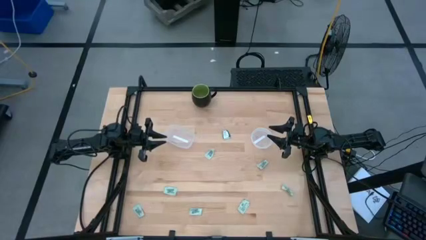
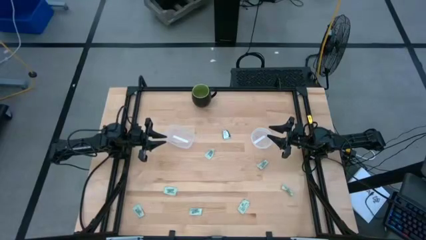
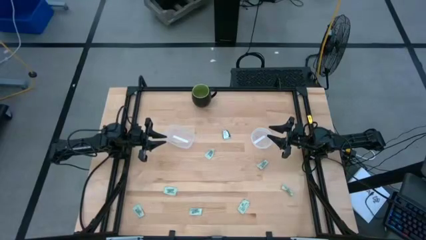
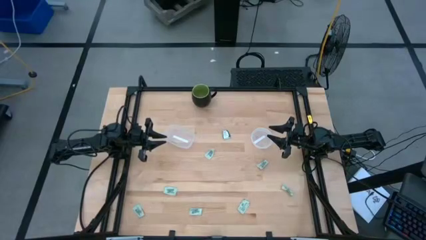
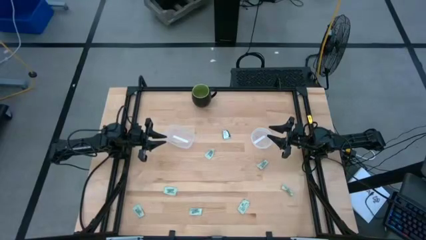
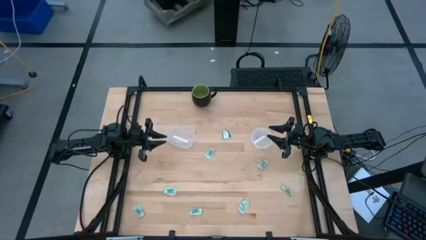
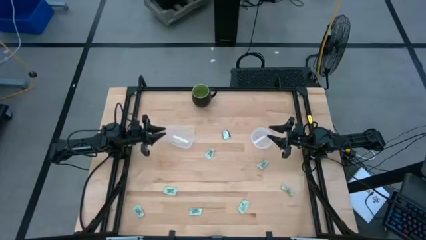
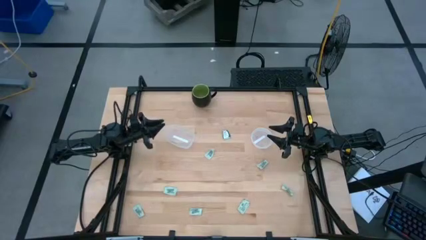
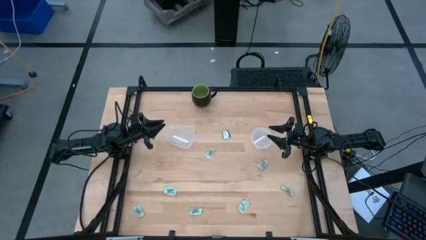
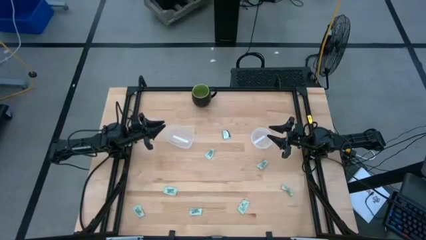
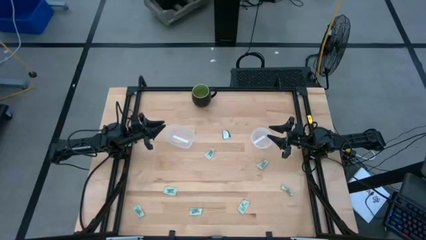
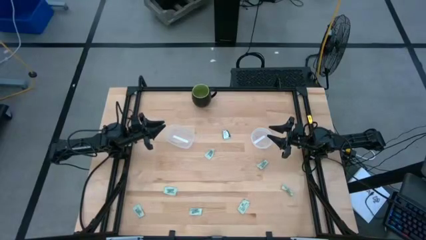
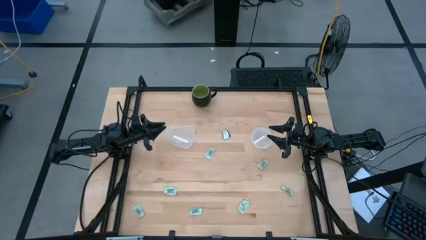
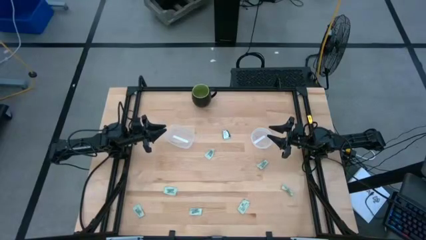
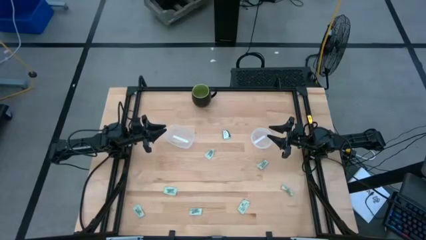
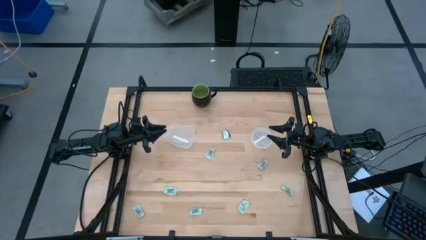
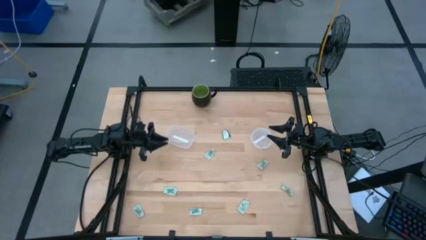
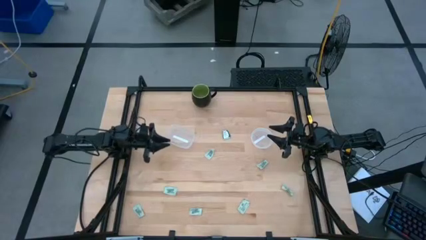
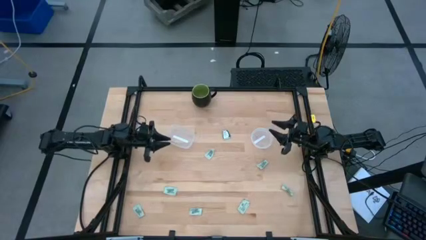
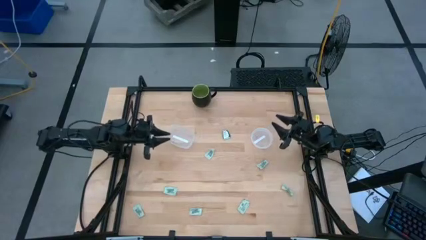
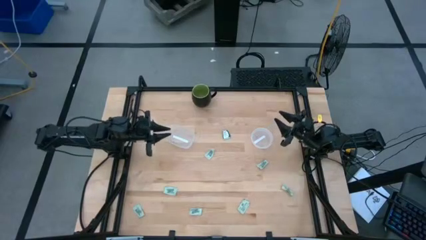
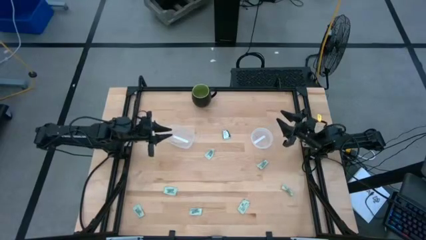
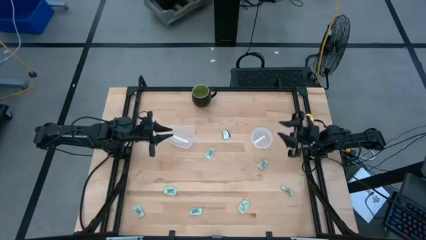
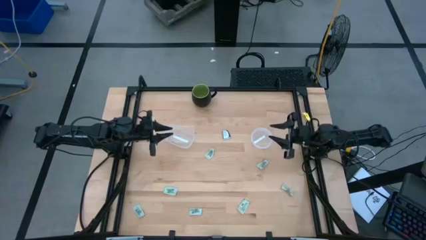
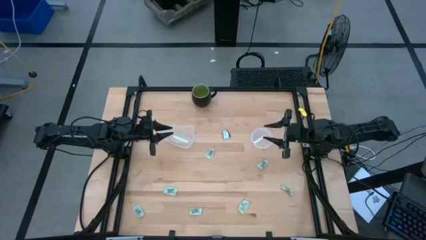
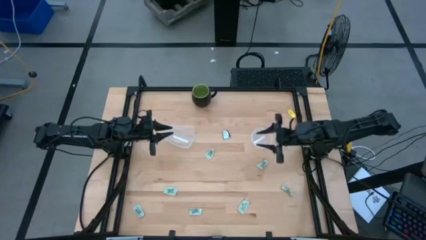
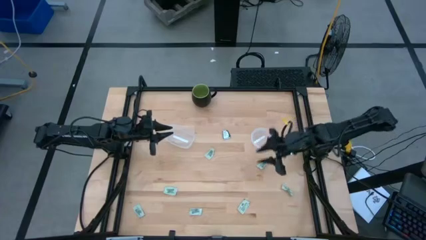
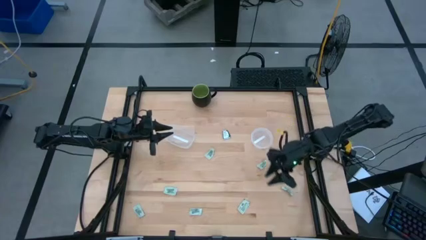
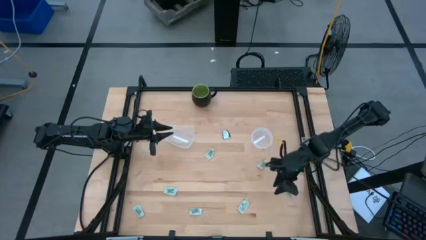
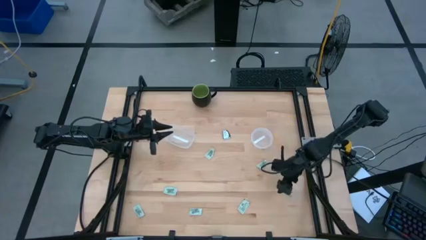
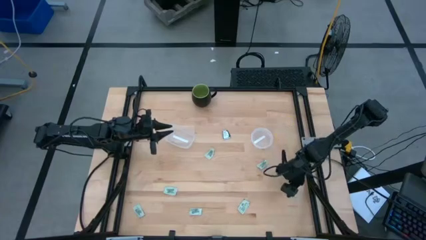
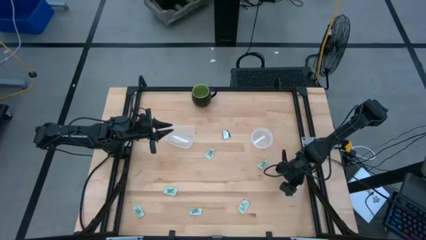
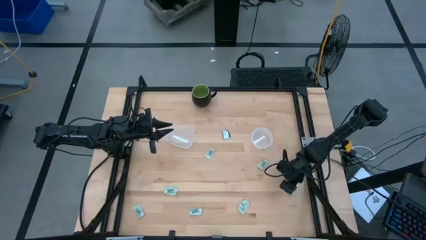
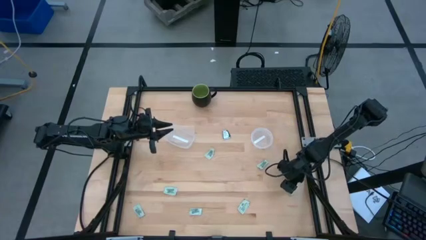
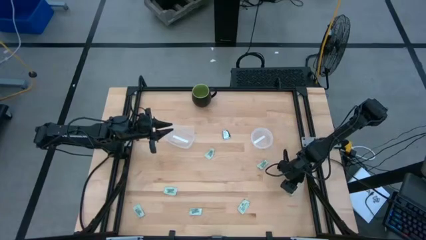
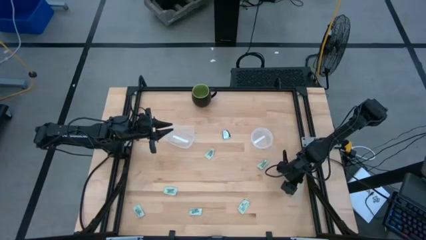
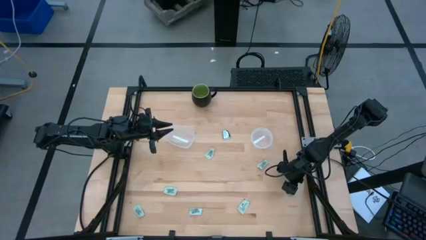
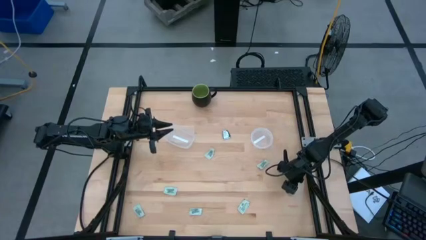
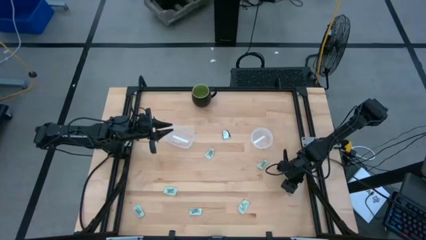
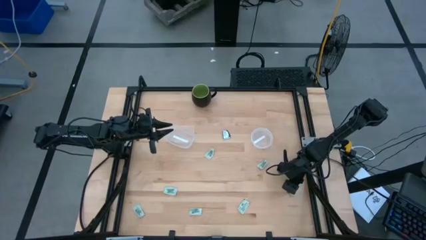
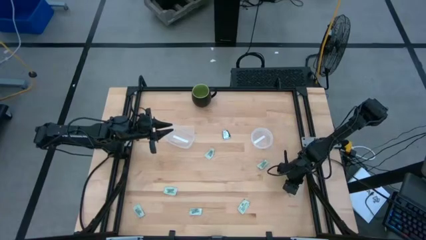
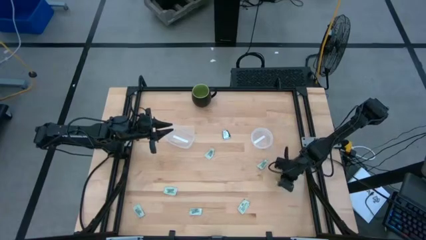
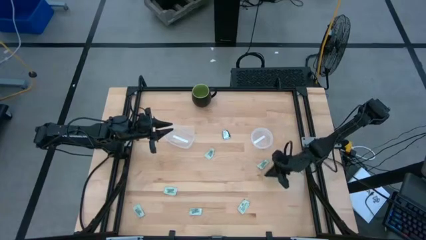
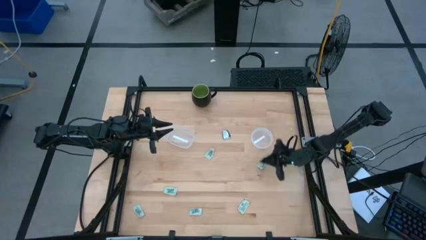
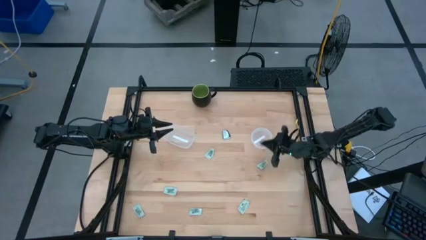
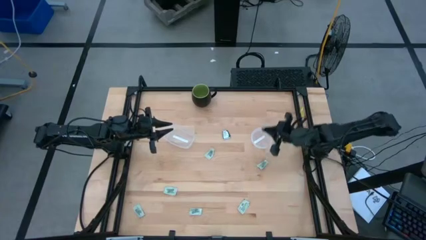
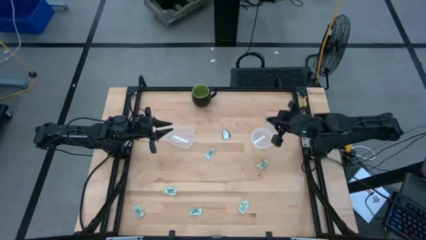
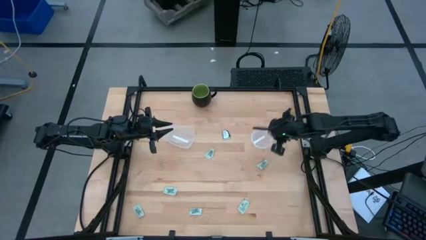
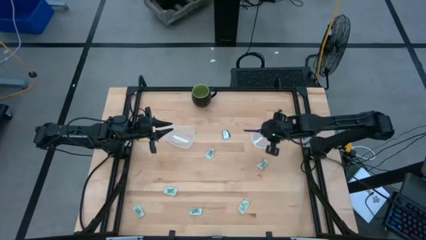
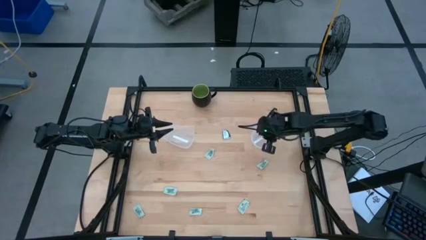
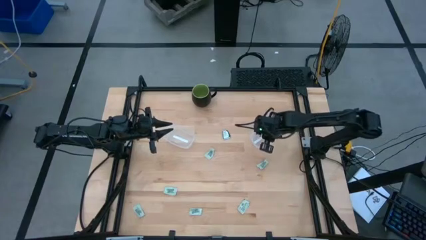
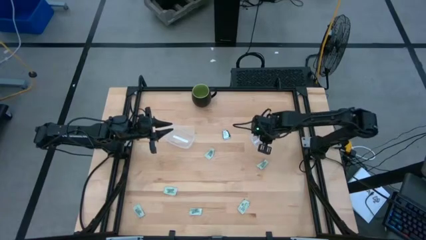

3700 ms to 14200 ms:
Task: Pick and place Stevia / Truvia into bins
Put the white stevia packet into the right transparent container

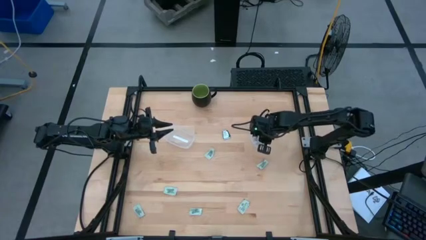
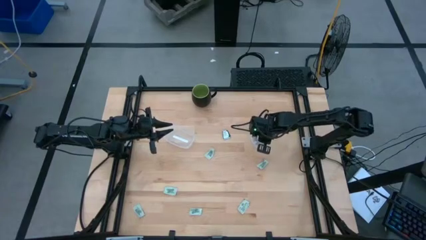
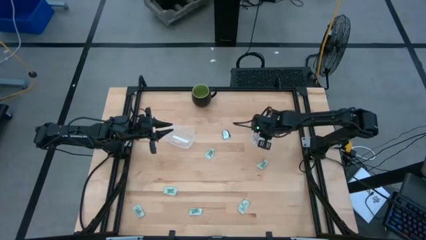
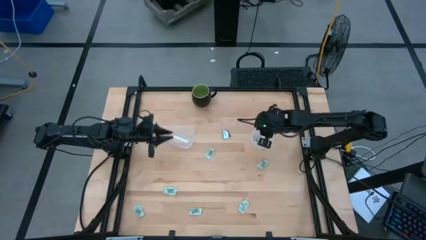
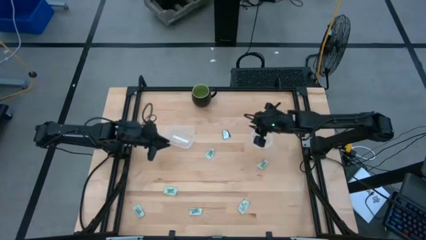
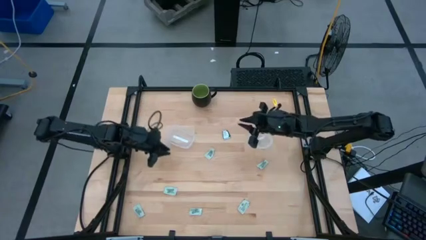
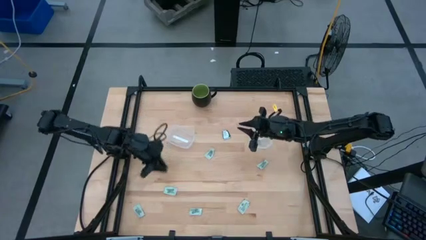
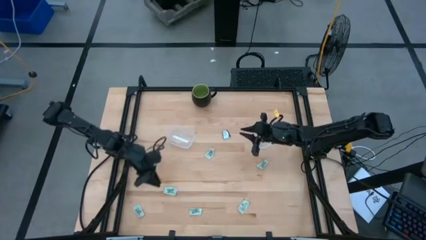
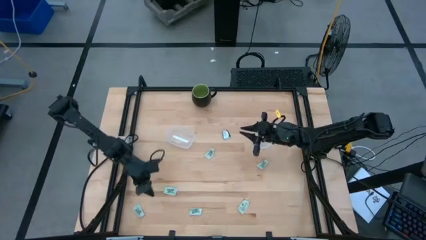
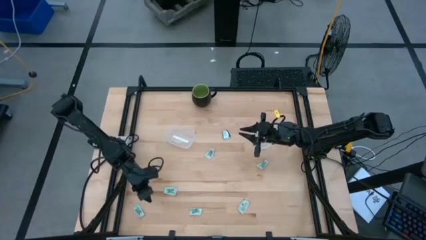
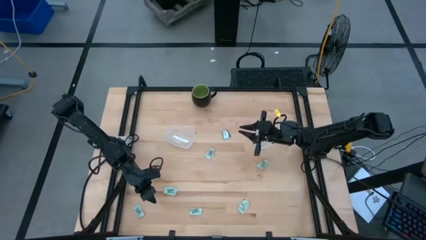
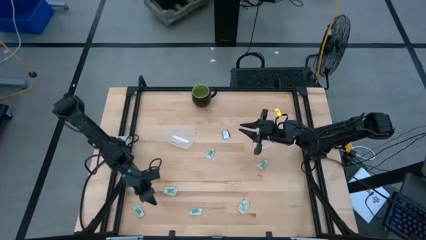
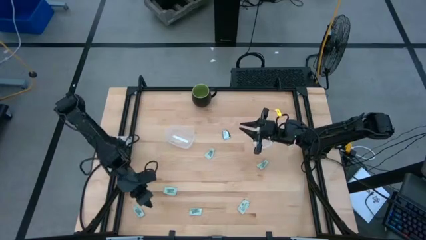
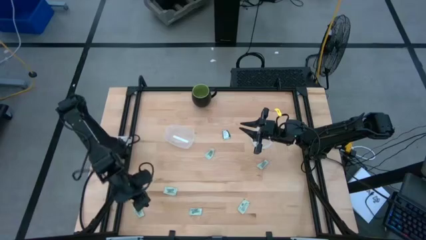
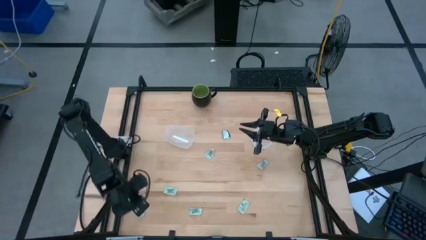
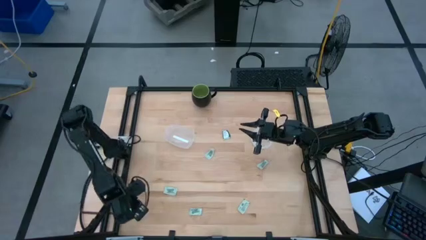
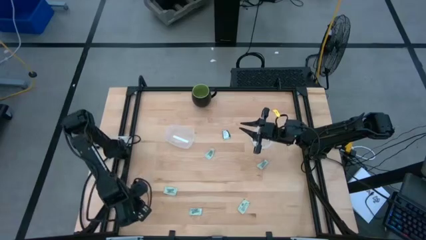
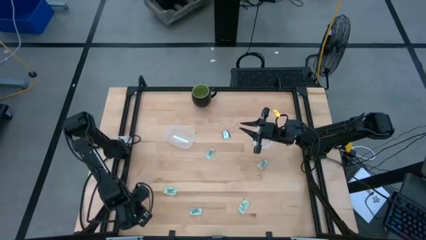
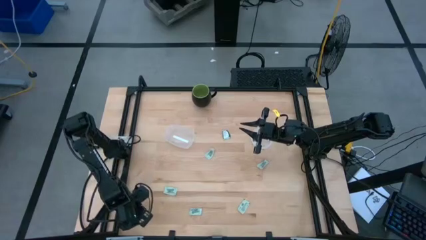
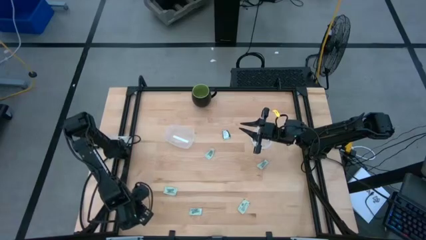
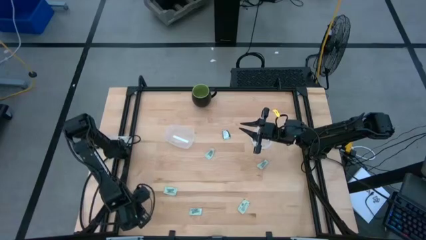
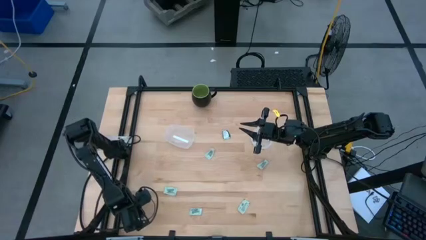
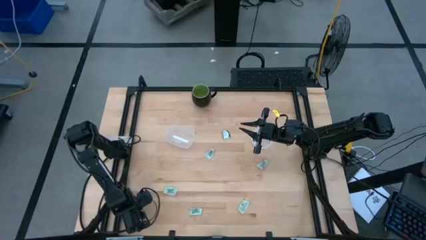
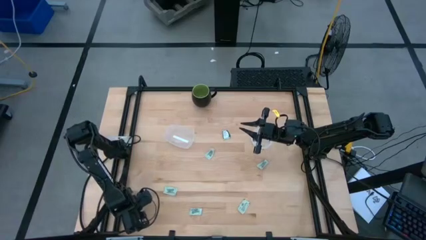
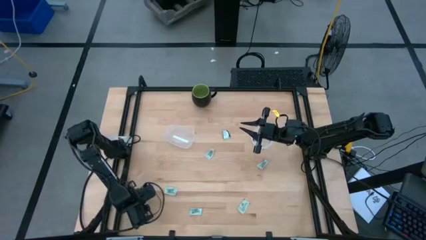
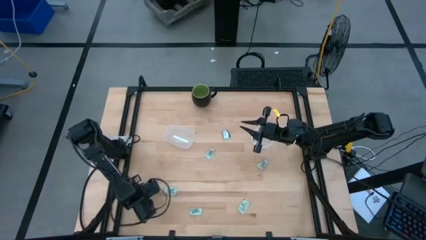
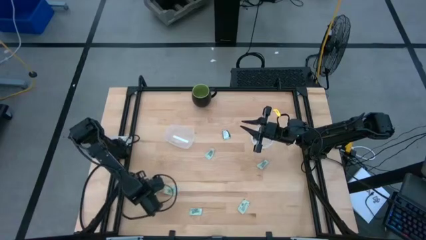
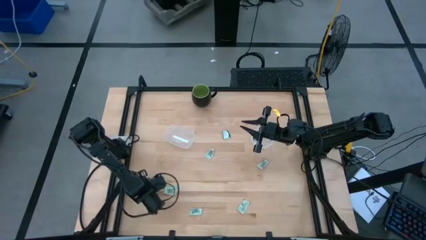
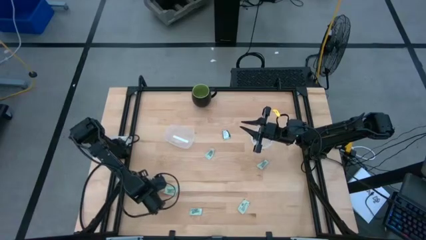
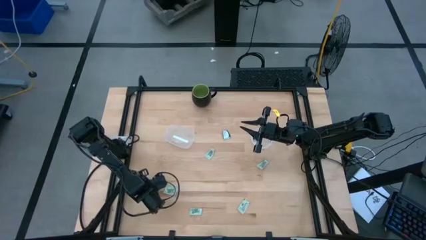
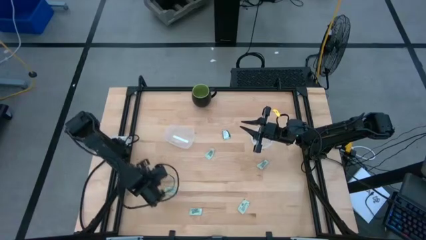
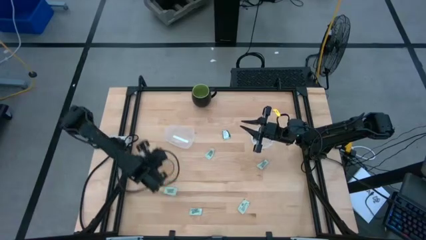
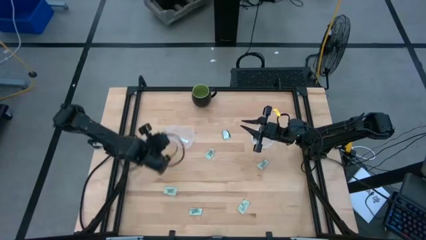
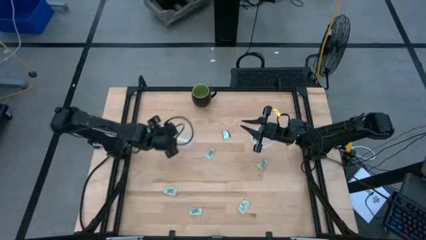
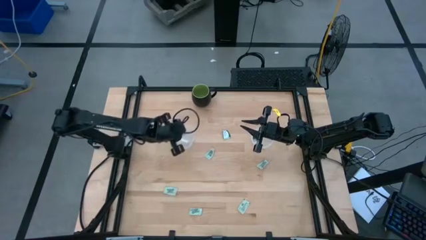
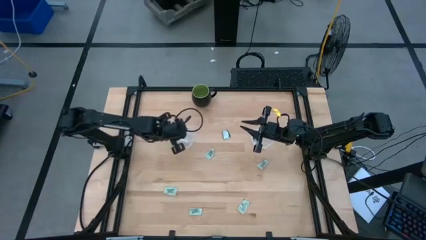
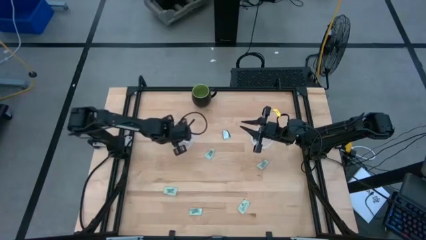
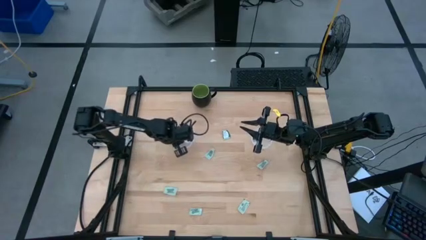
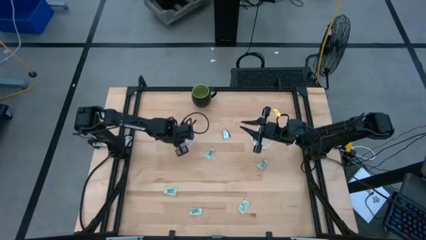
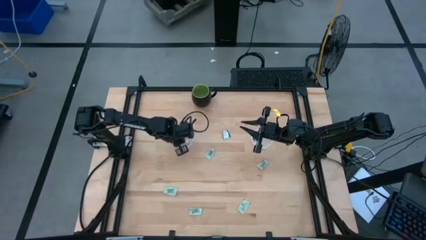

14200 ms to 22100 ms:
Put the white stevia packet into the left transparent container
